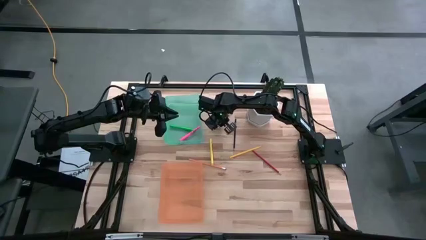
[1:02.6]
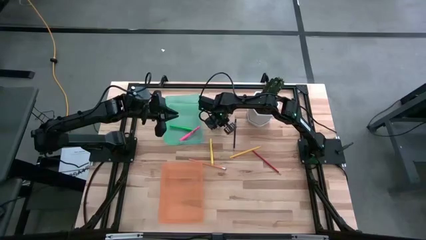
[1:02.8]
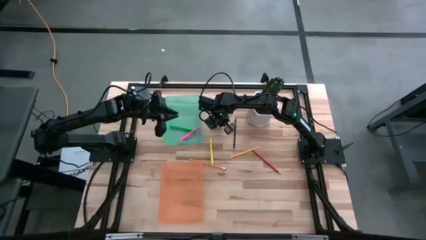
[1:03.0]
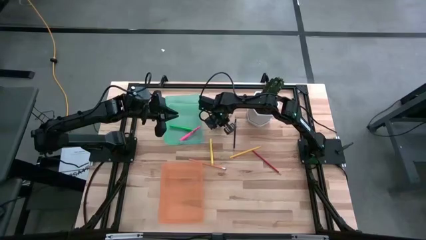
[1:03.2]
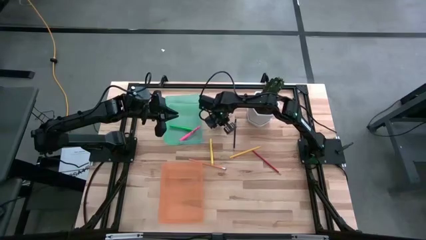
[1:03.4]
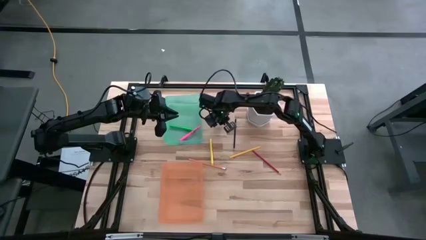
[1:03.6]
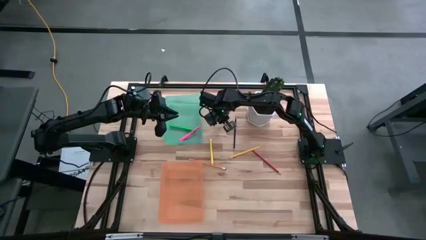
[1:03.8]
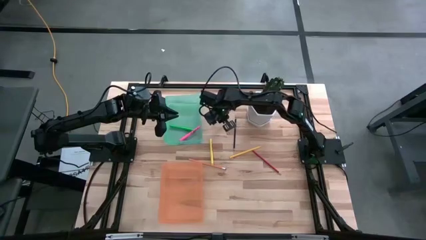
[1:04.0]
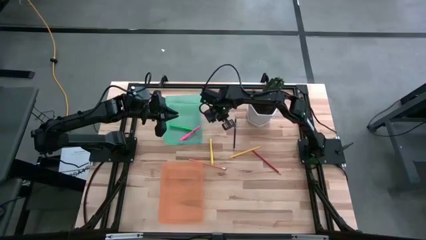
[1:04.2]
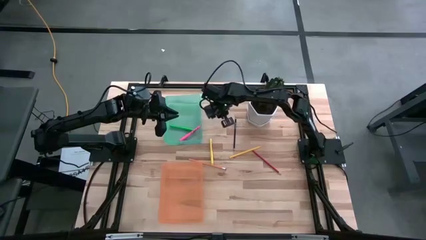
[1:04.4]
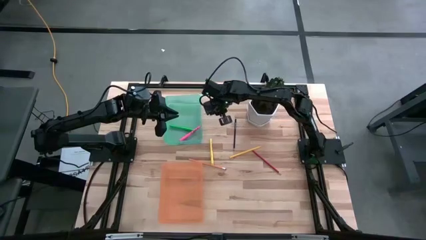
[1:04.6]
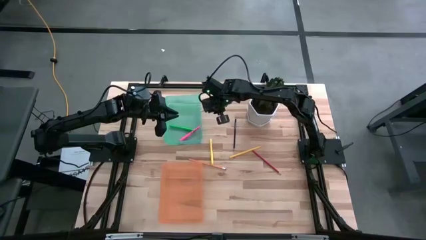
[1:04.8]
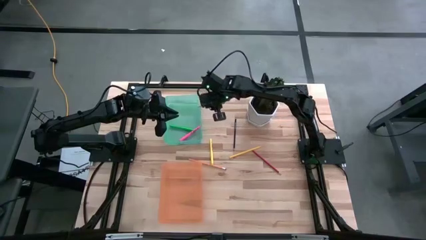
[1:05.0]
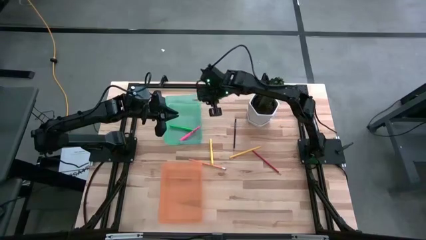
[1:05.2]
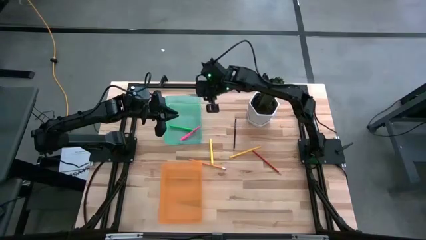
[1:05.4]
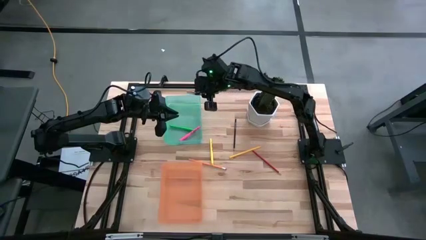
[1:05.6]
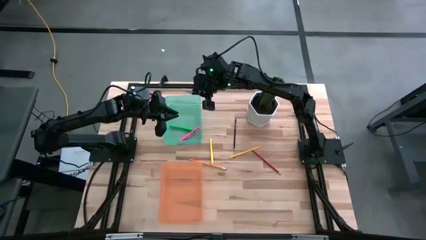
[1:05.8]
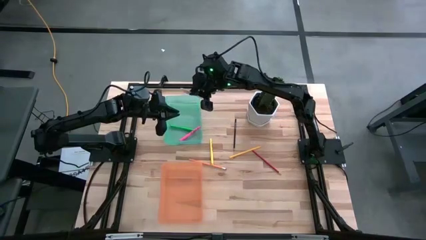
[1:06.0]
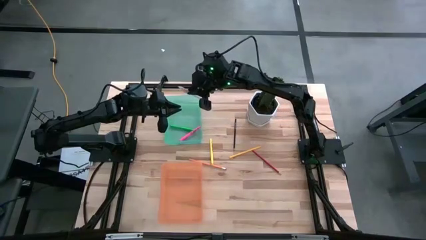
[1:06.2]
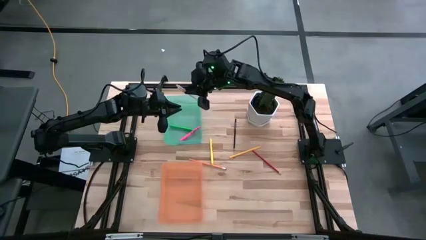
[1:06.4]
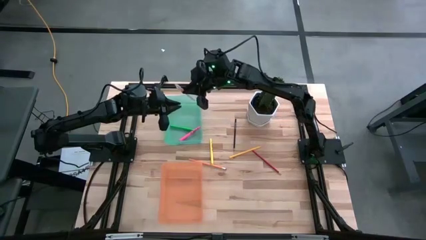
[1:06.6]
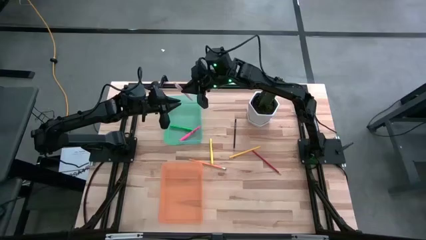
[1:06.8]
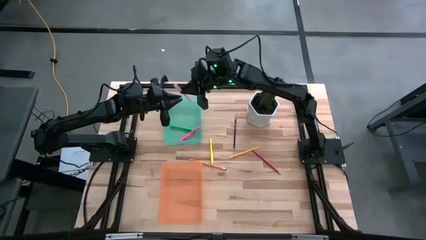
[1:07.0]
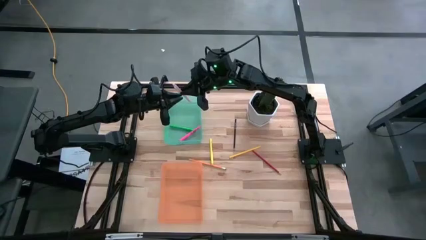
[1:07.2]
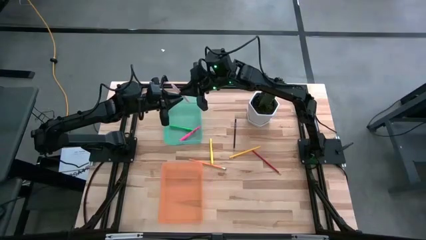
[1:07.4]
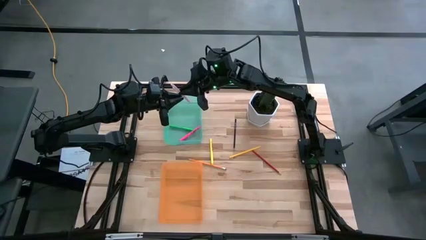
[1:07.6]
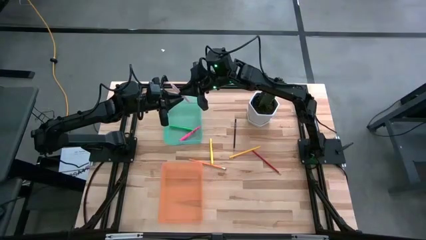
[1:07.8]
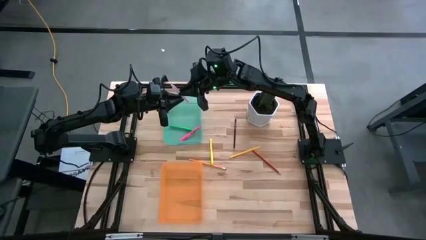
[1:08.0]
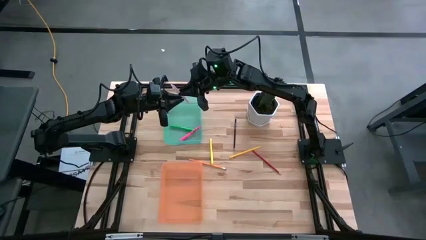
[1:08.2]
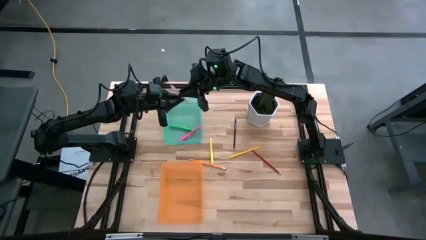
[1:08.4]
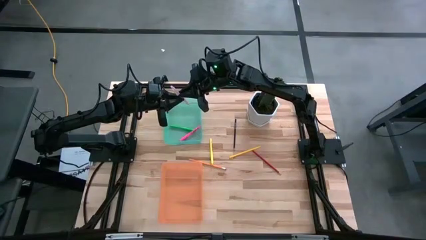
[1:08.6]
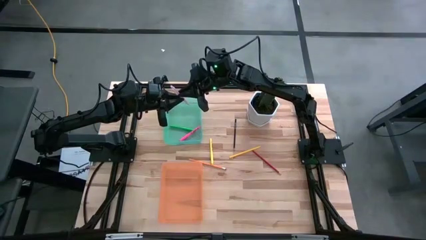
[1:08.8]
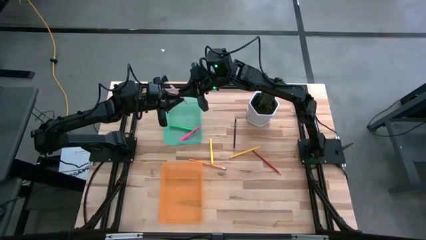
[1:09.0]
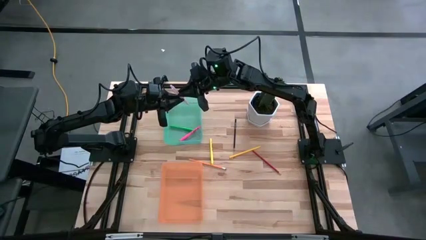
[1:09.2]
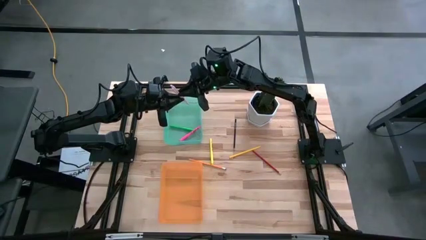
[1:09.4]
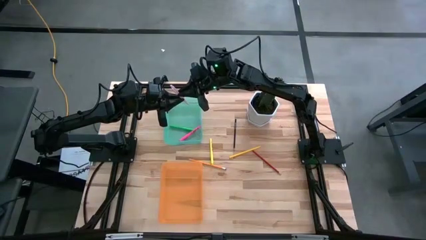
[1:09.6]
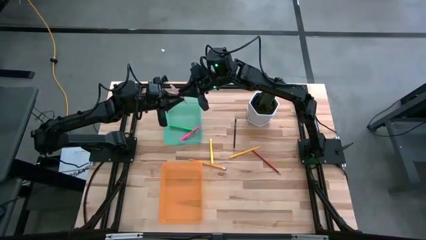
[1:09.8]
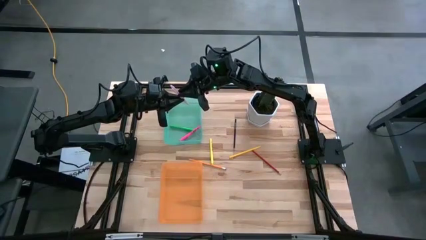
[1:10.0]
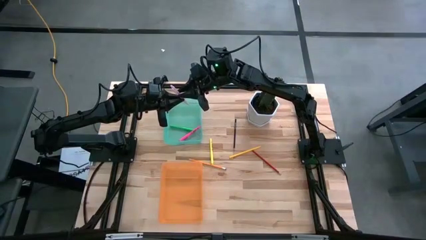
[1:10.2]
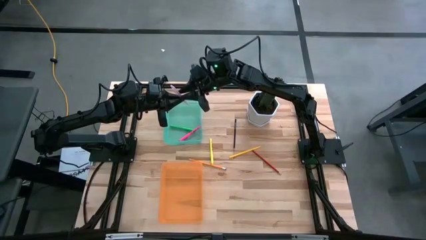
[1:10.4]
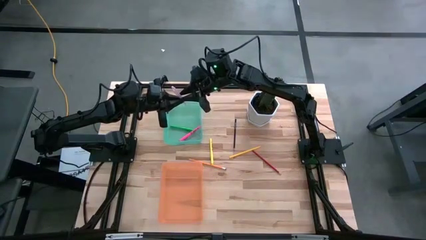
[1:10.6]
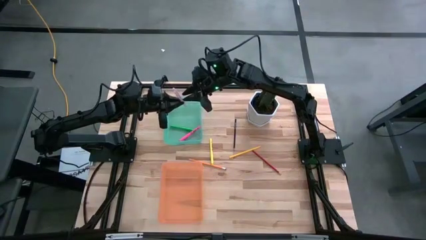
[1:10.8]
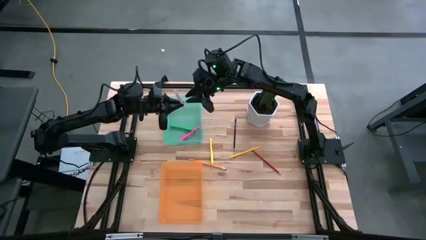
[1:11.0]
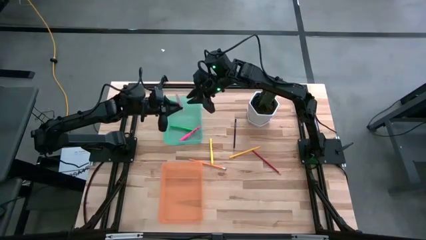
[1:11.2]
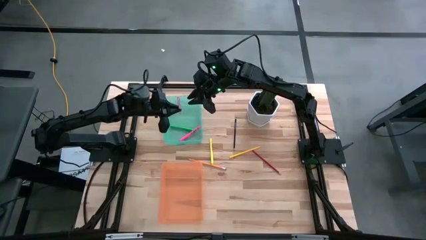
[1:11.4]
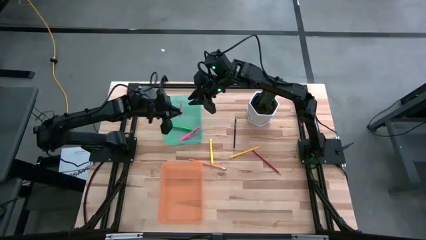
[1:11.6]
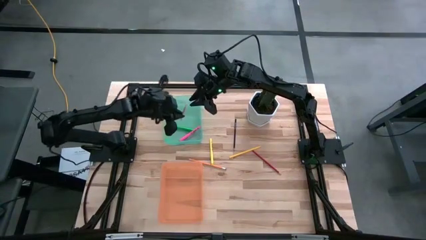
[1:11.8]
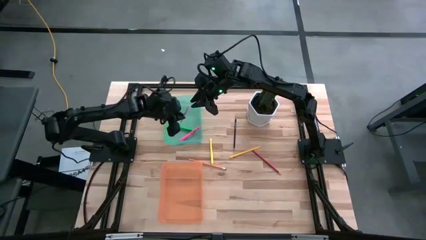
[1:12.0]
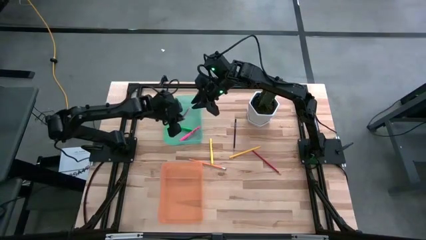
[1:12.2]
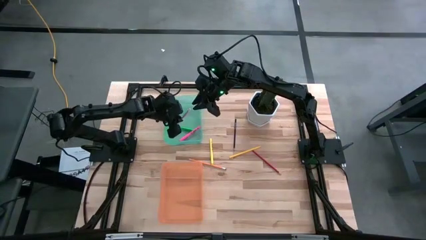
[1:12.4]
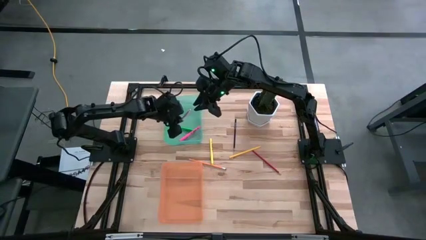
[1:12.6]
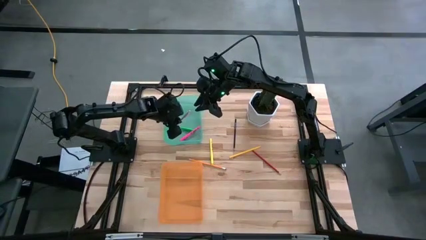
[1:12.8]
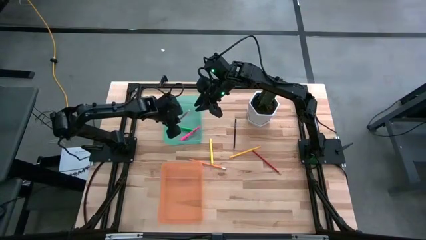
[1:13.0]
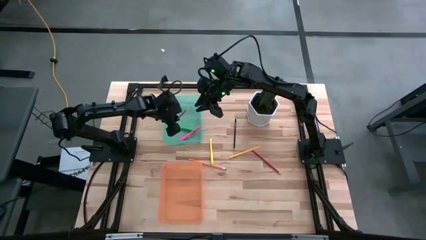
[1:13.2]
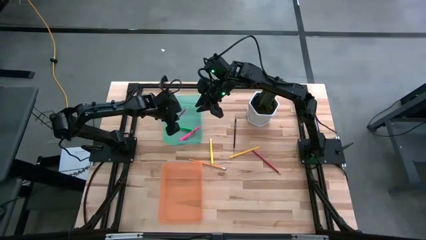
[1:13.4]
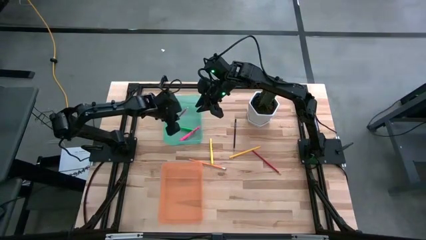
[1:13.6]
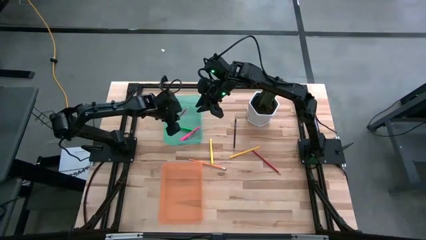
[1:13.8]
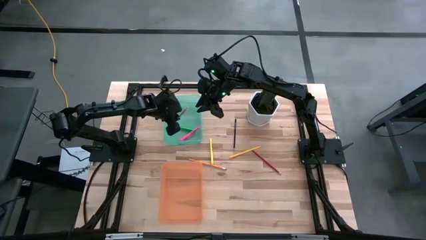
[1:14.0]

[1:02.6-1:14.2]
Task: Sort pens & pencils
Put the pink pen into the green bin
